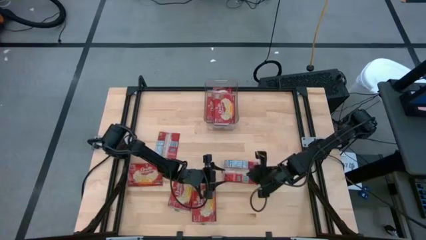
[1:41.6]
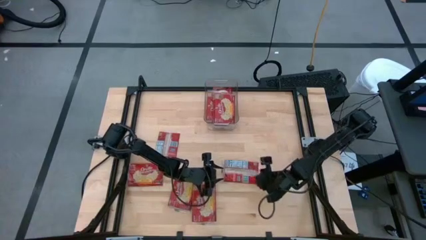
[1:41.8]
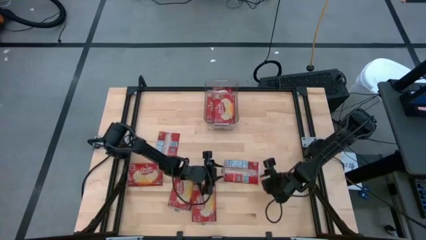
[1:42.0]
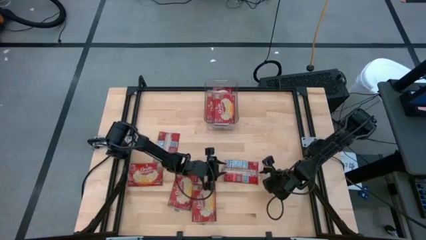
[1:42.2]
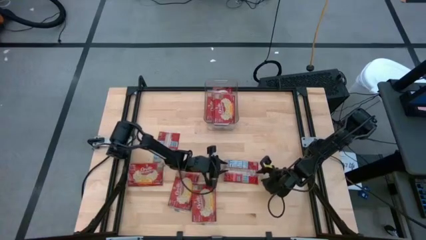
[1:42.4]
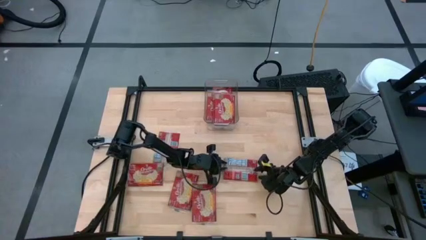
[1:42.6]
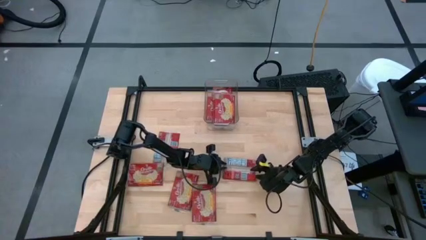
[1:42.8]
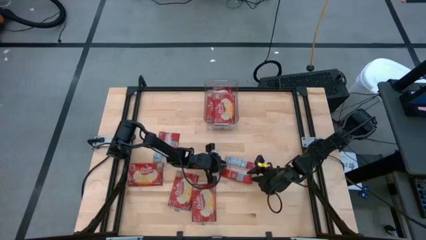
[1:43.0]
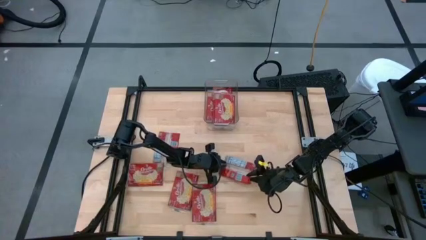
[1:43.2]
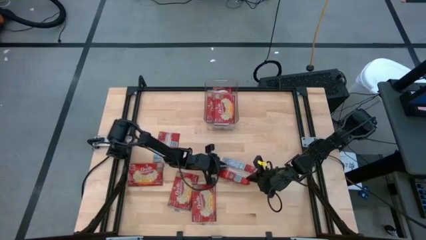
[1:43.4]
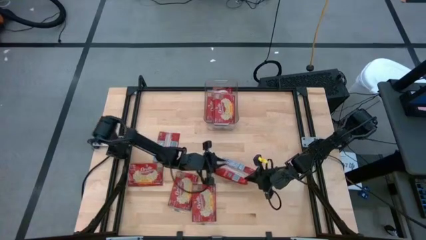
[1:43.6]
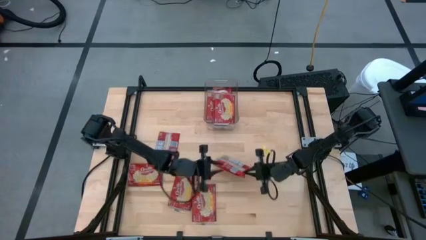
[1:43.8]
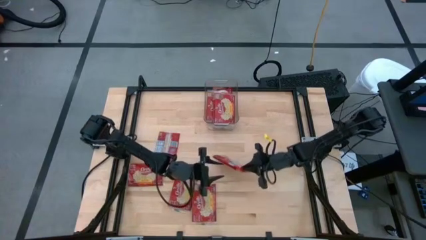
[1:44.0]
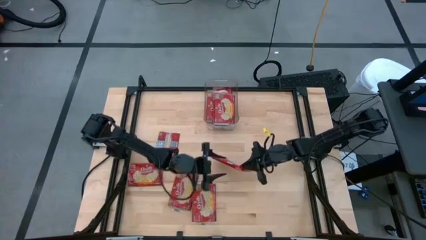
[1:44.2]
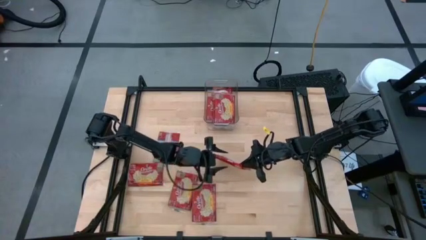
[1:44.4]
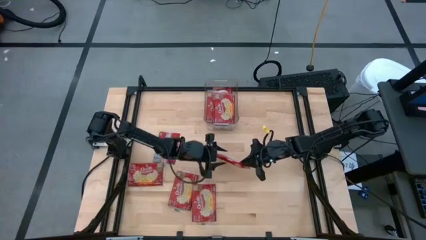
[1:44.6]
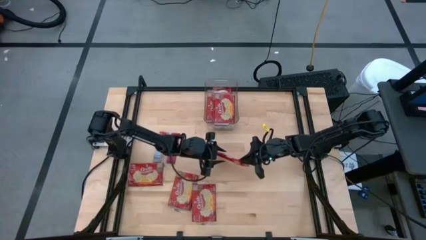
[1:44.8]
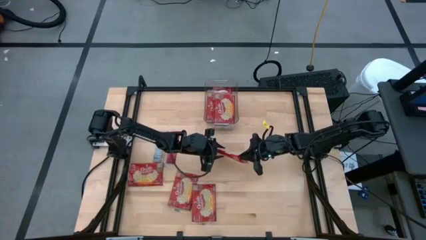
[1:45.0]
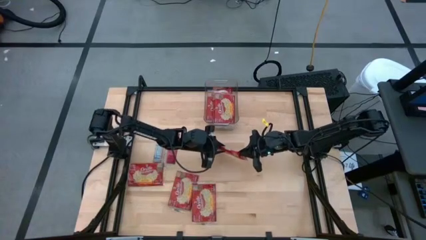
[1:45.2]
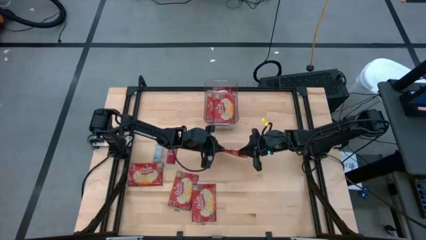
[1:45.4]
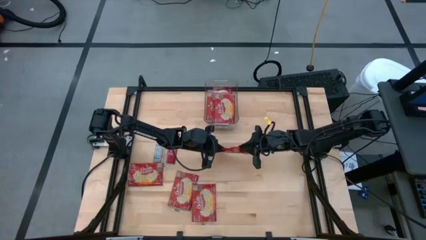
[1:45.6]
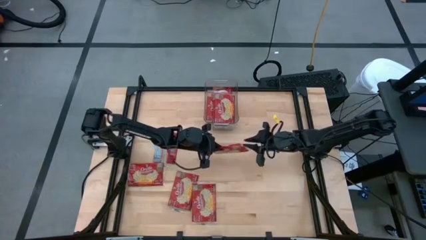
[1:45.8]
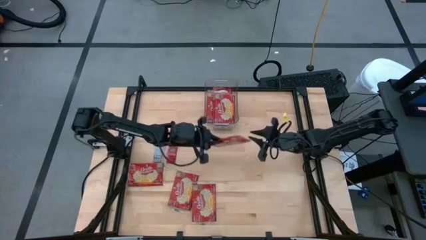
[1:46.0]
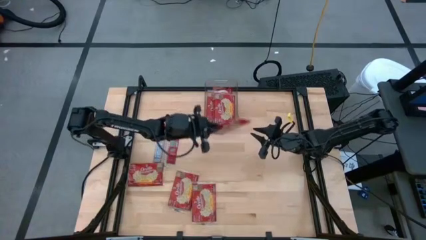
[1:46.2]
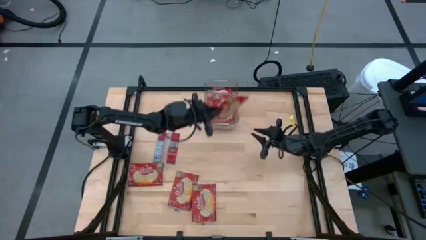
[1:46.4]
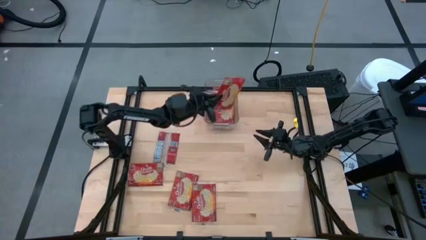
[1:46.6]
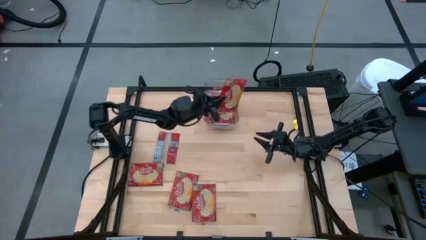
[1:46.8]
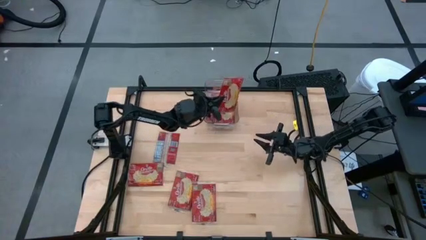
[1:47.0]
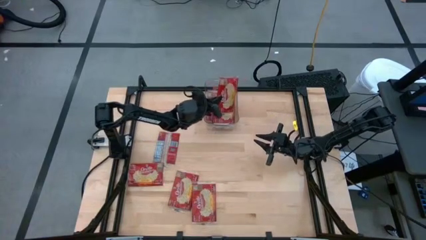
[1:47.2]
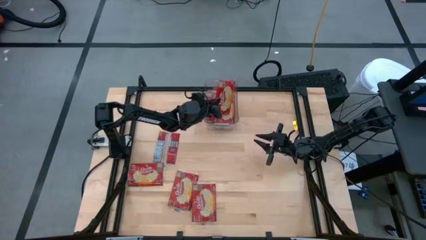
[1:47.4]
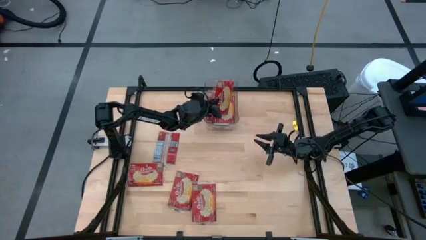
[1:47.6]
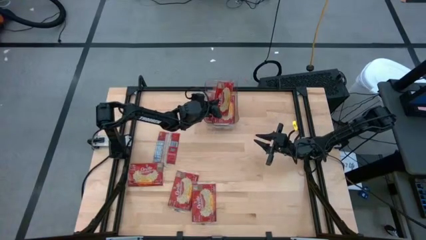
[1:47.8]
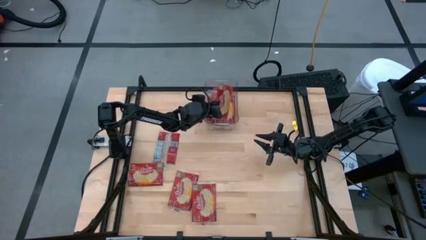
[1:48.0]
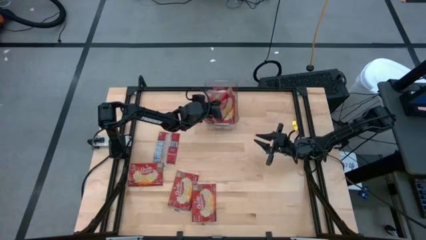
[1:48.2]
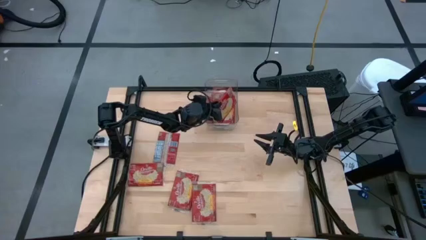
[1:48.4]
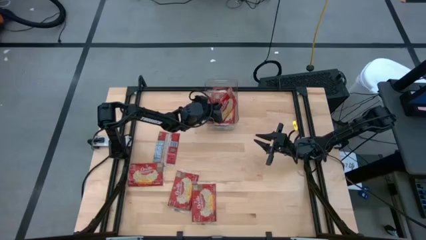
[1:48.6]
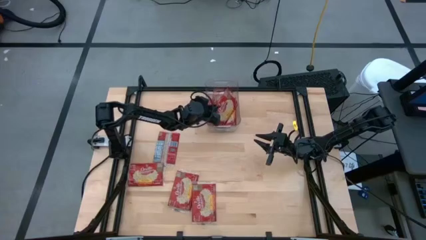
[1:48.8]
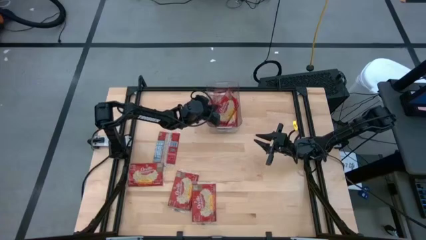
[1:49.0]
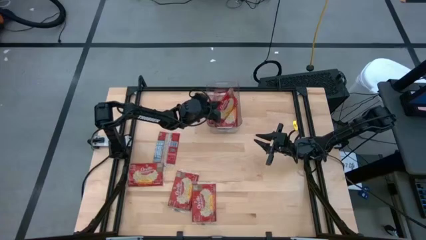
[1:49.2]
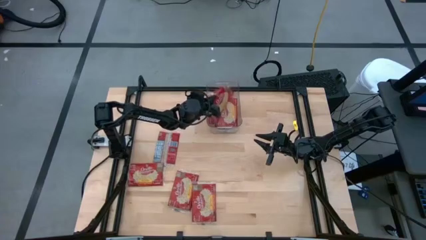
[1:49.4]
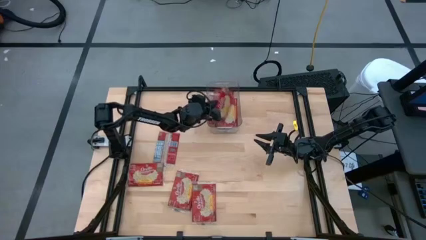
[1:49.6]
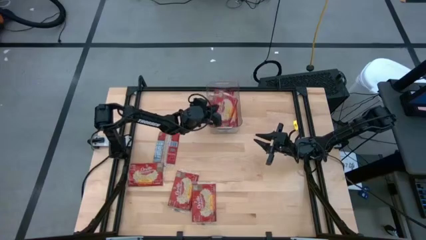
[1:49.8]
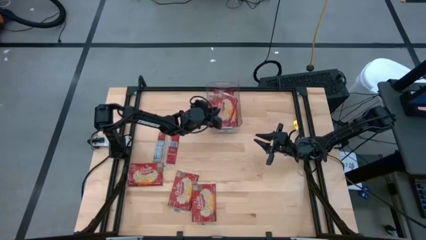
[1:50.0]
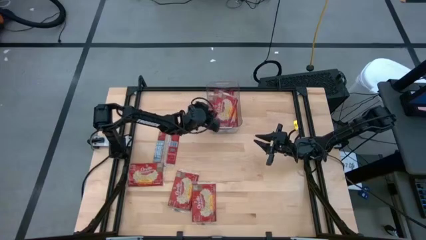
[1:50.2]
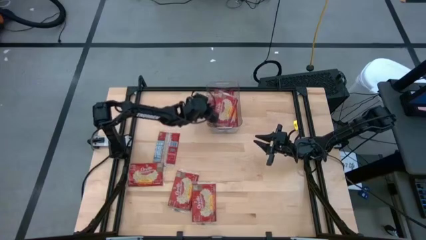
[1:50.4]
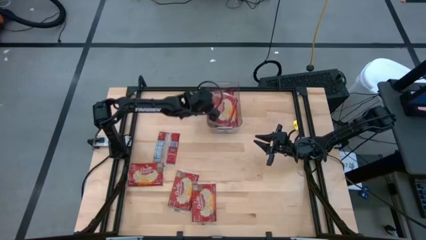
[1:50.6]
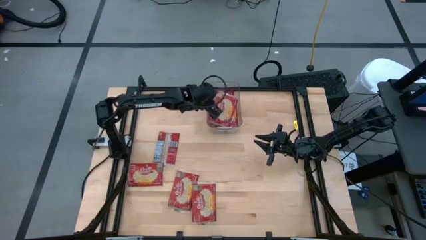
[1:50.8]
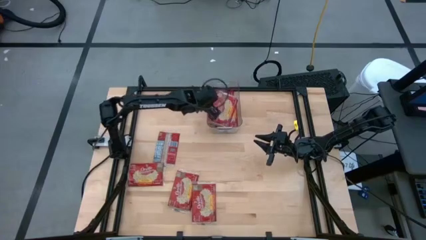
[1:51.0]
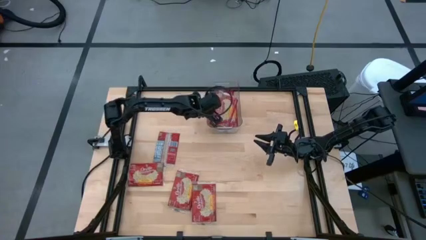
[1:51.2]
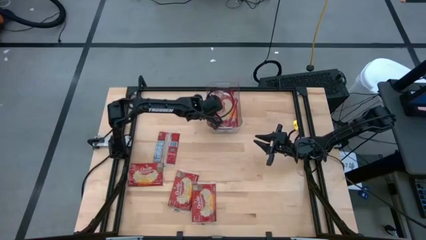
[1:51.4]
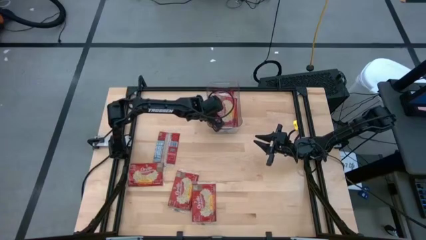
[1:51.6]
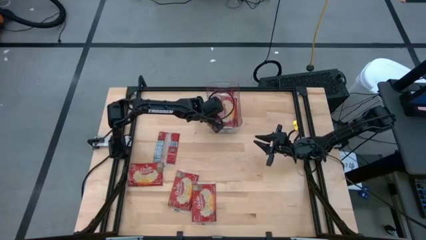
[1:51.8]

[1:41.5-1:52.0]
Task: Sort popcorn bags into baskets
Put the red popcorn pack into the transparent bin

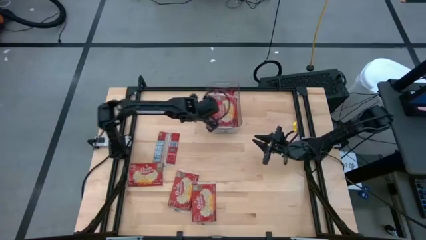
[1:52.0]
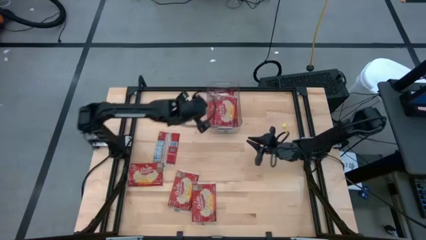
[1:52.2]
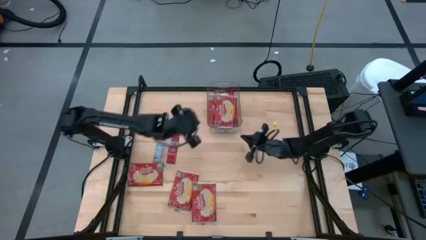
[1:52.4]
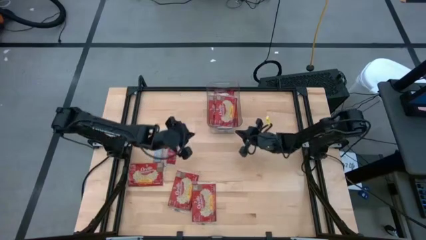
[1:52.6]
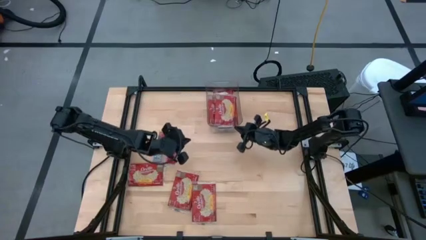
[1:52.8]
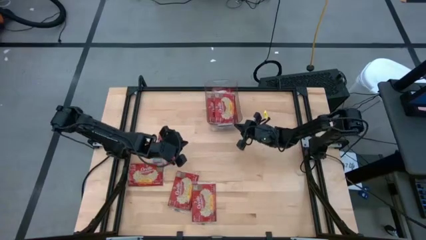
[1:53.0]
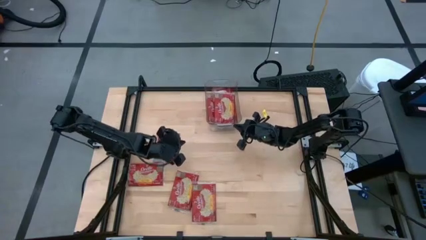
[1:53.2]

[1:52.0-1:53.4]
Adjust the transparent bin
